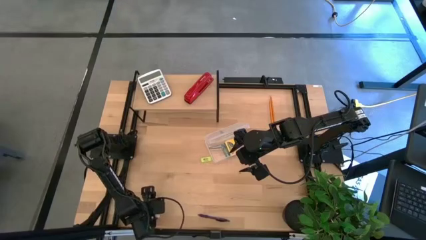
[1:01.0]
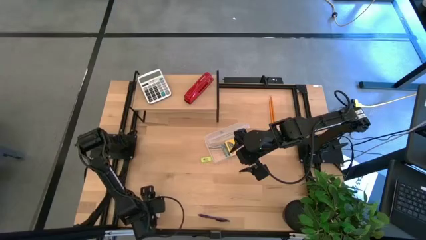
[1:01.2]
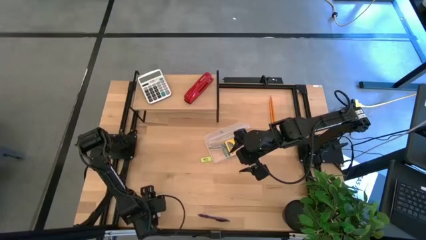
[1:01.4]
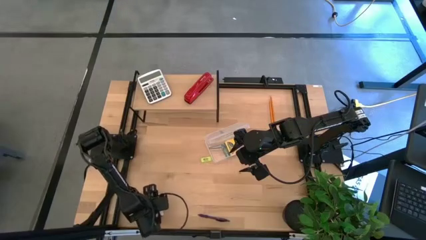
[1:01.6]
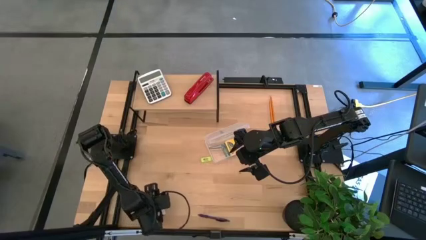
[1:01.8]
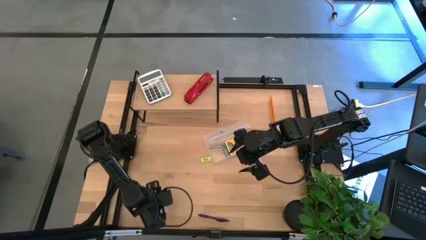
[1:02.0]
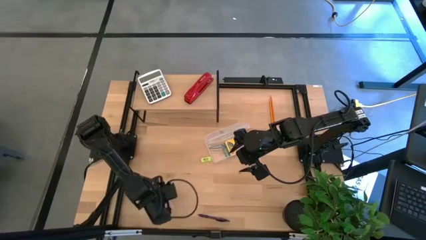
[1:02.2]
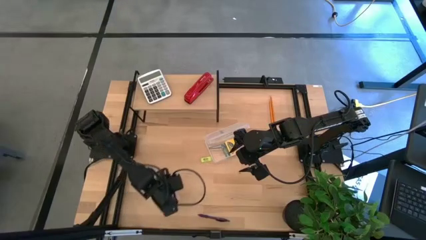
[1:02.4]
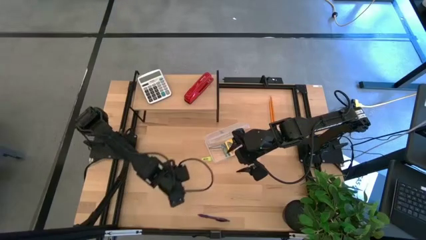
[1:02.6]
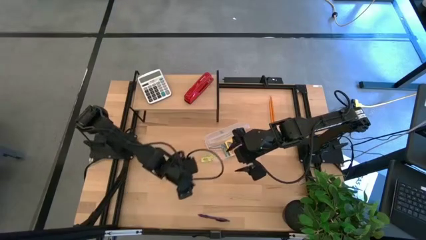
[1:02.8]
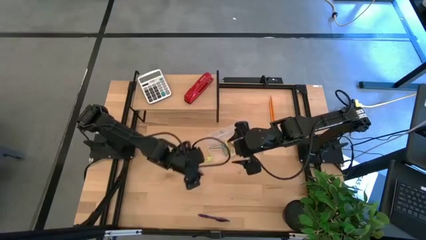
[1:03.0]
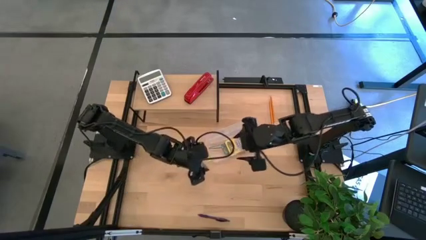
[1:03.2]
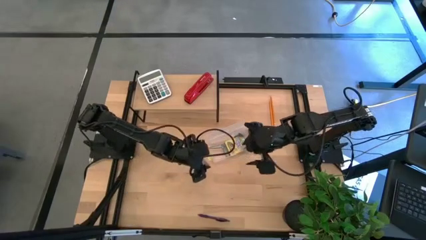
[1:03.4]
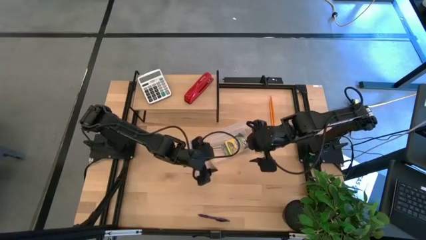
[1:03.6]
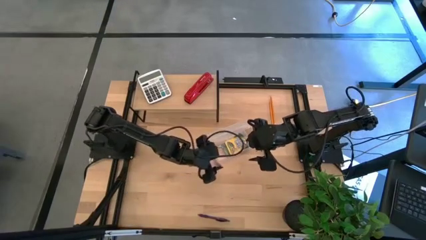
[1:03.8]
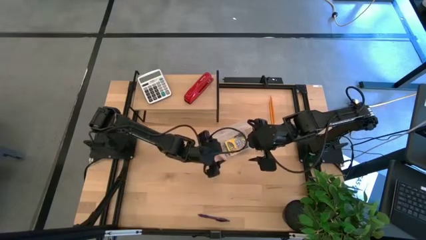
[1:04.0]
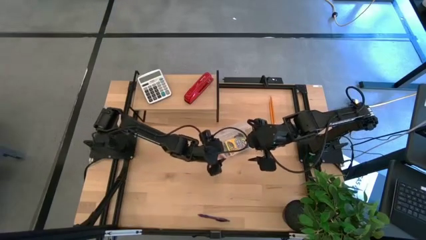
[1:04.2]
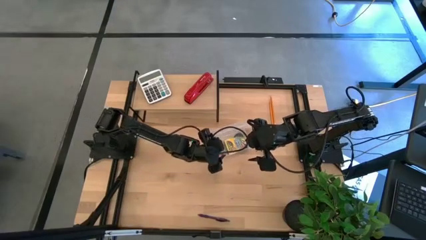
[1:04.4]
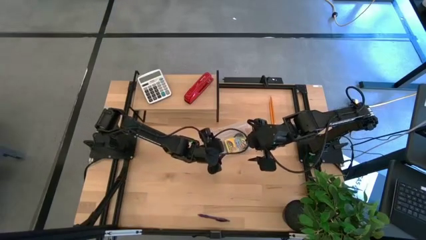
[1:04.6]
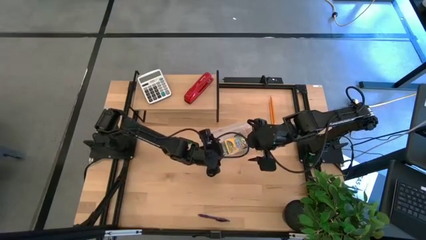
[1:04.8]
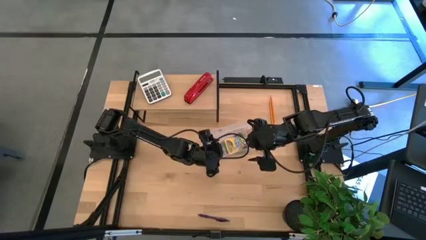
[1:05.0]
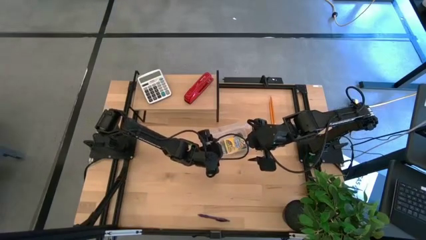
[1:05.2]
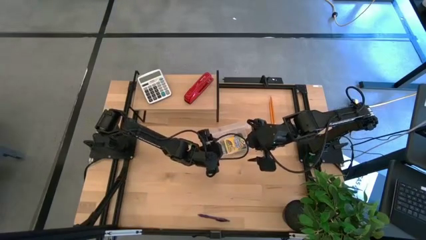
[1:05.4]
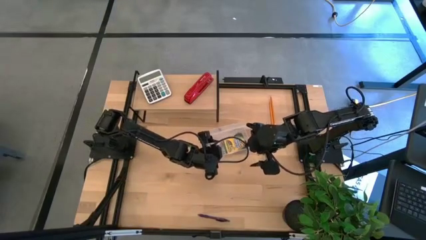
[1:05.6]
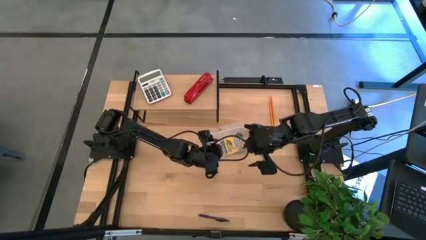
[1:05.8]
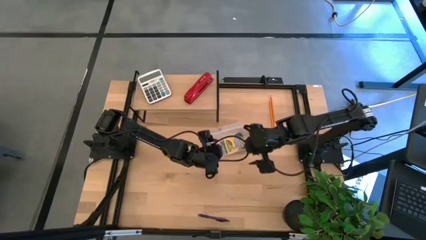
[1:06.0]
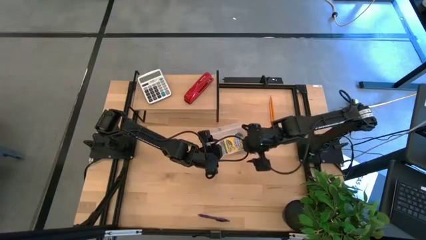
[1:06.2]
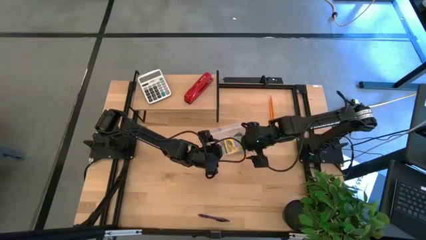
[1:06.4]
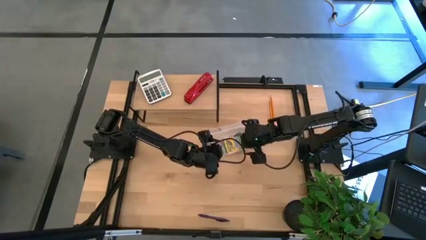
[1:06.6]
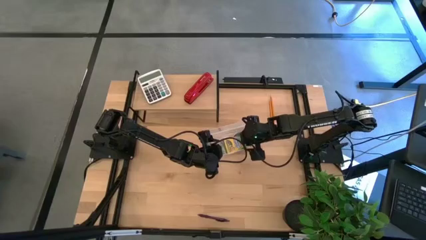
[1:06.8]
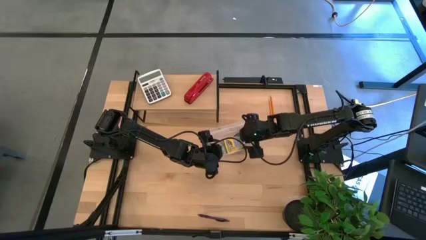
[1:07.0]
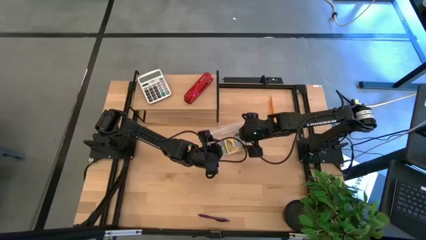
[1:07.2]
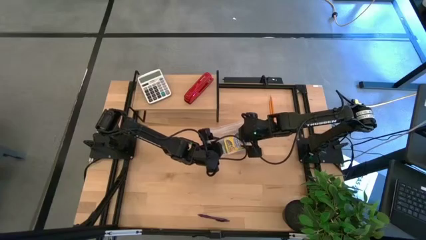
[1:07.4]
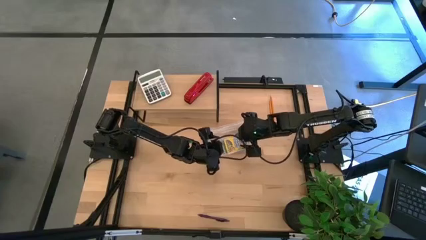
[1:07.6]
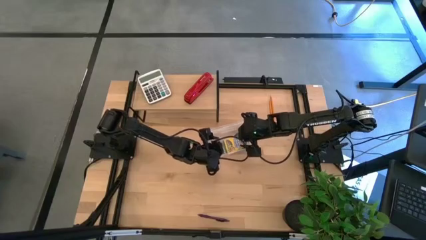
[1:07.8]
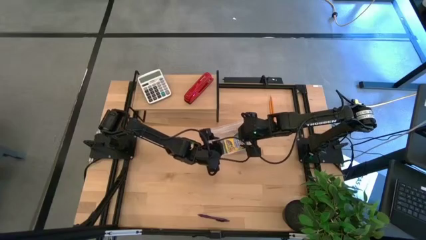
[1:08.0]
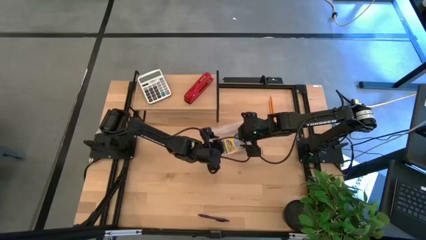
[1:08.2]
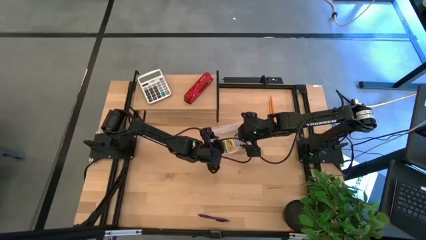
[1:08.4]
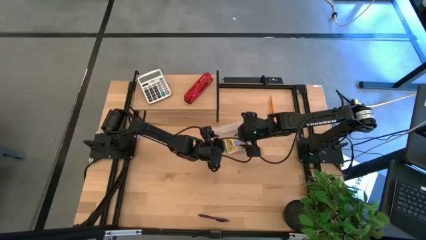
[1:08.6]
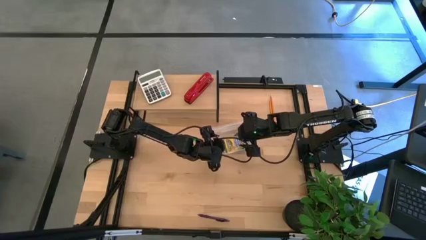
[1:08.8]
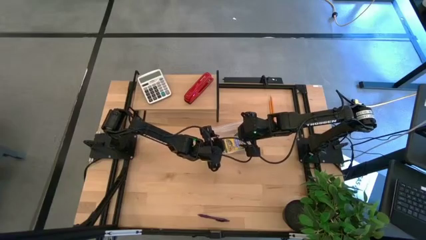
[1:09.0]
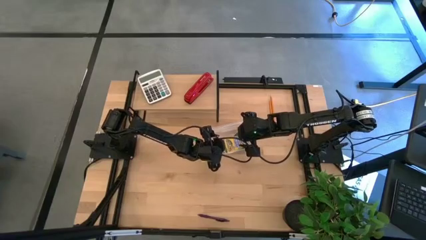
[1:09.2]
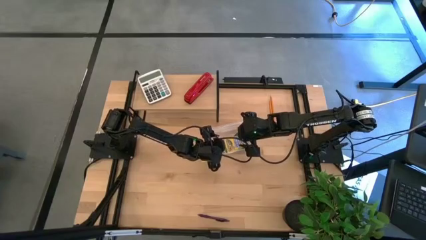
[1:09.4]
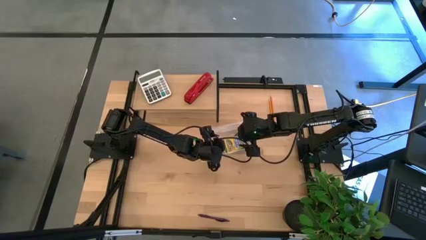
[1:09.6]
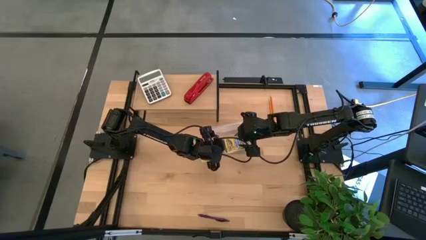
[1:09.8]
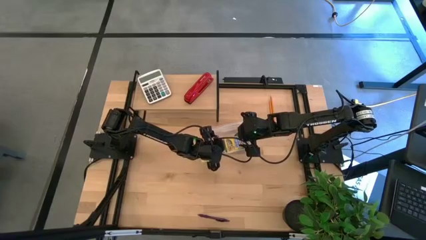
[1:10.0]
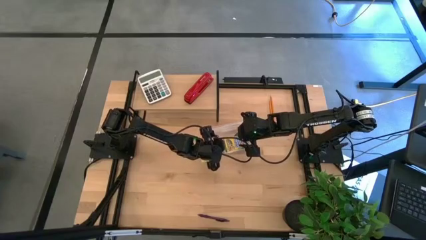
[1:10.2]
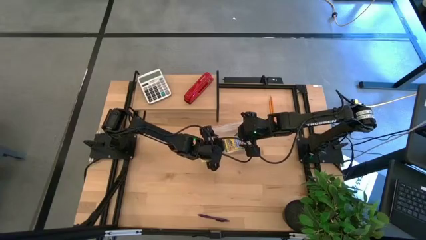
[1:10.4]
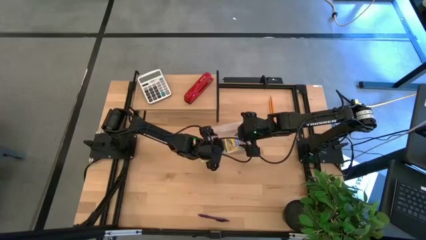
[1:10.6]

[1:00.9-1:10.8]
Task: Pack school essentials
Put the pink sticky note into the supply box

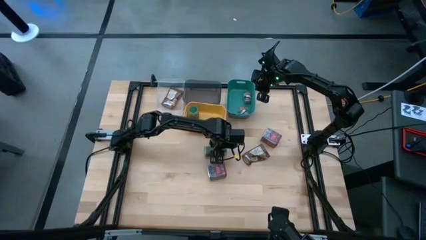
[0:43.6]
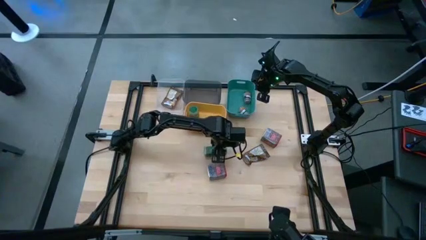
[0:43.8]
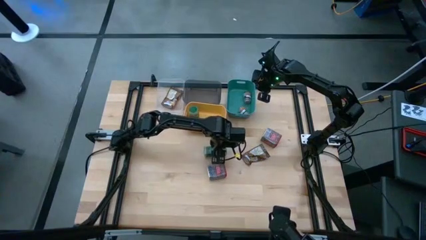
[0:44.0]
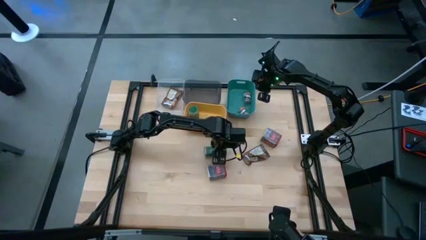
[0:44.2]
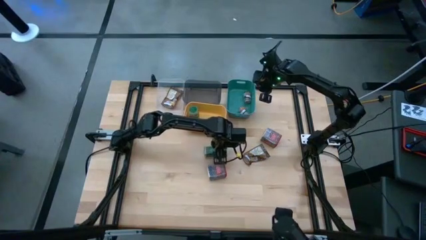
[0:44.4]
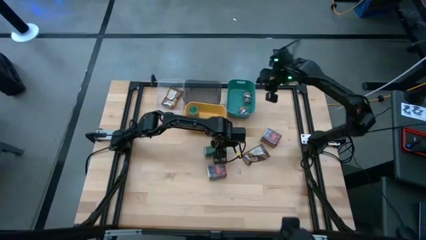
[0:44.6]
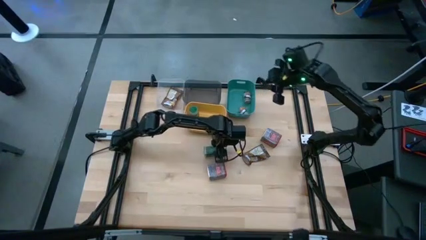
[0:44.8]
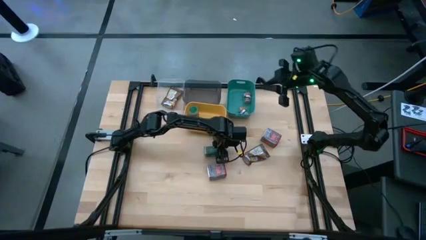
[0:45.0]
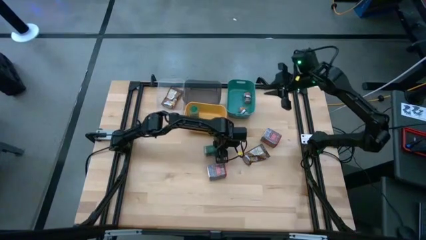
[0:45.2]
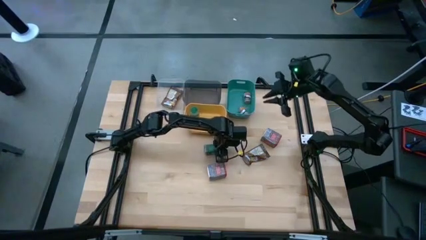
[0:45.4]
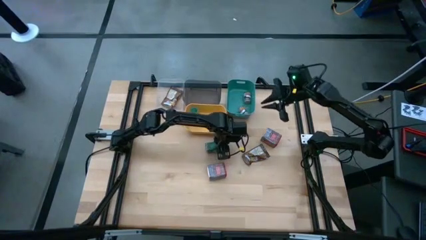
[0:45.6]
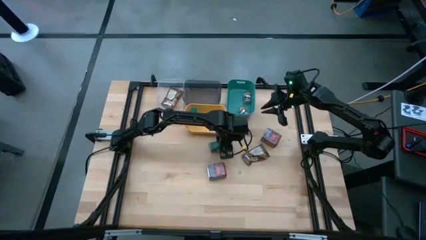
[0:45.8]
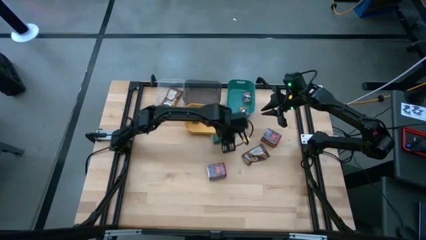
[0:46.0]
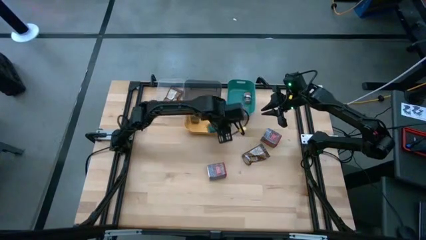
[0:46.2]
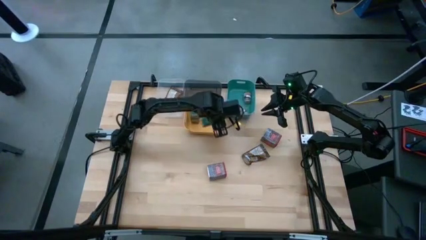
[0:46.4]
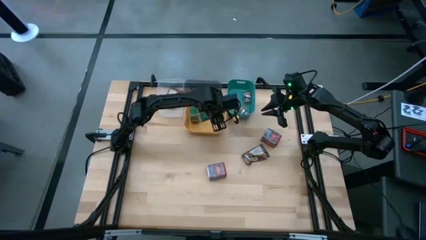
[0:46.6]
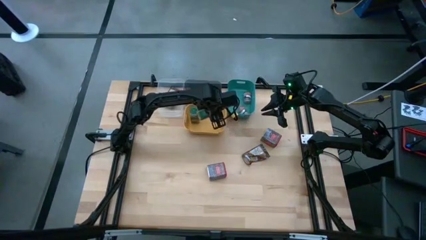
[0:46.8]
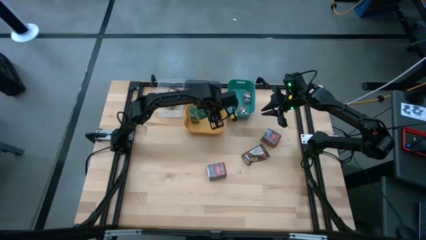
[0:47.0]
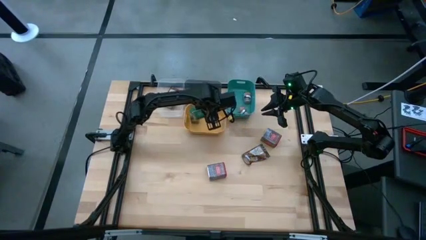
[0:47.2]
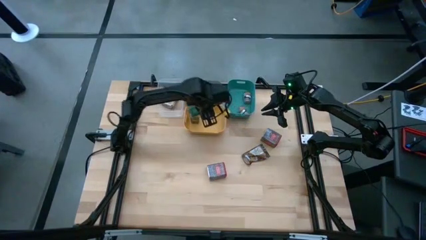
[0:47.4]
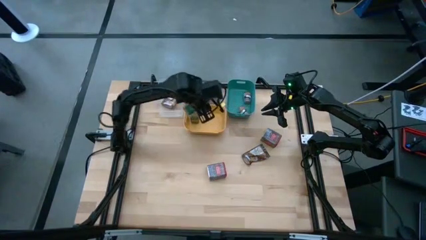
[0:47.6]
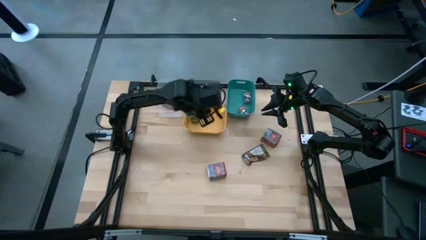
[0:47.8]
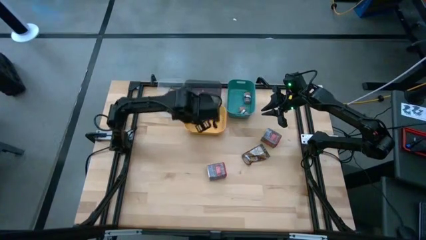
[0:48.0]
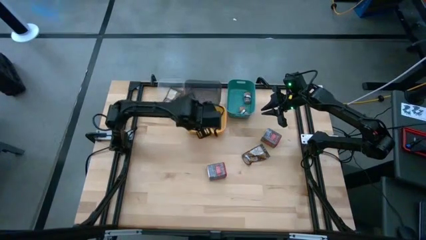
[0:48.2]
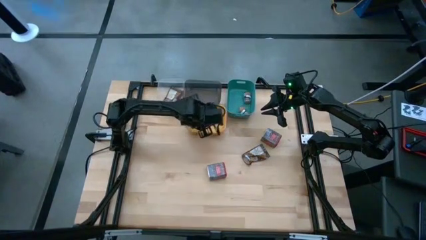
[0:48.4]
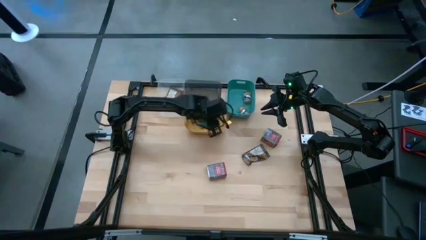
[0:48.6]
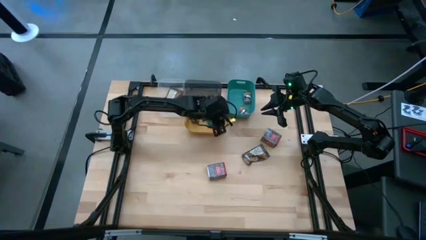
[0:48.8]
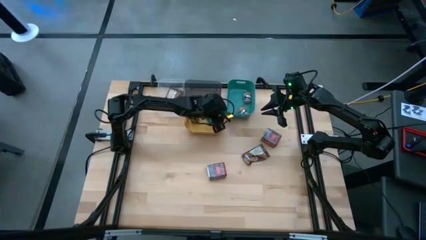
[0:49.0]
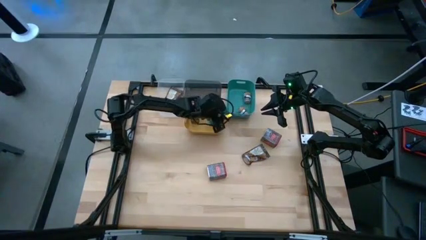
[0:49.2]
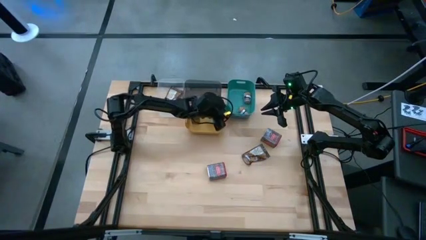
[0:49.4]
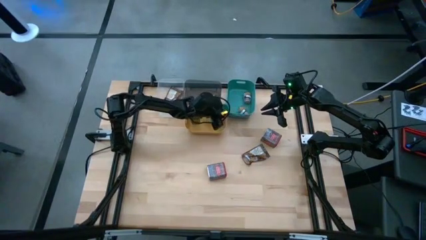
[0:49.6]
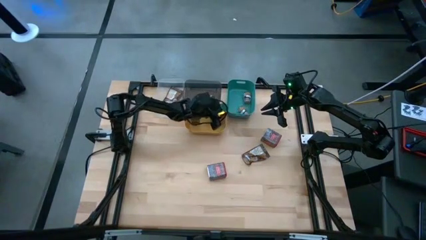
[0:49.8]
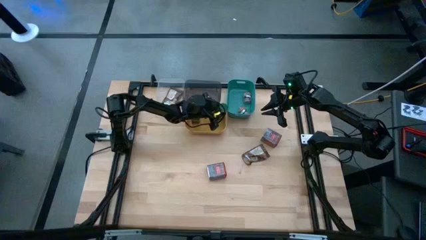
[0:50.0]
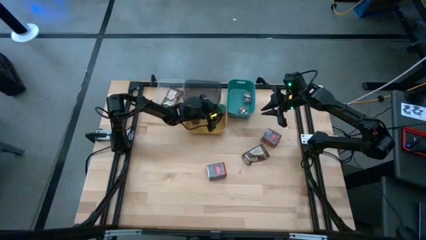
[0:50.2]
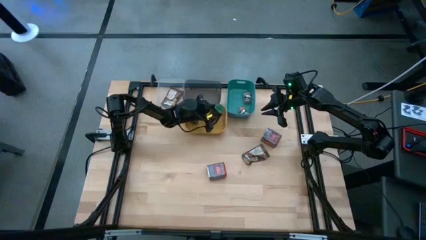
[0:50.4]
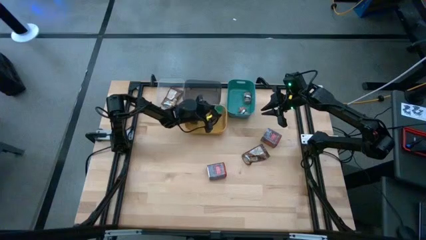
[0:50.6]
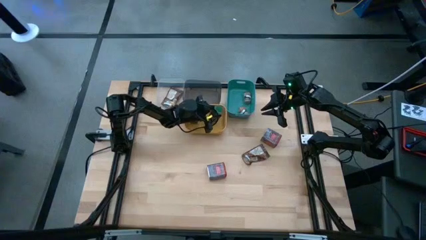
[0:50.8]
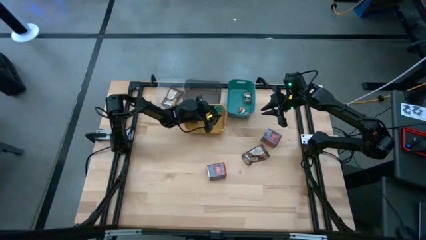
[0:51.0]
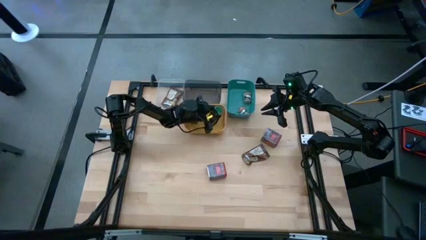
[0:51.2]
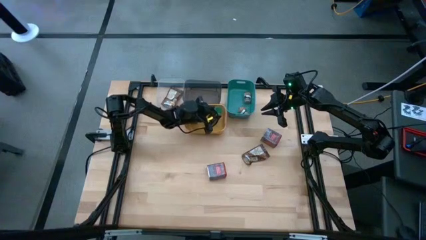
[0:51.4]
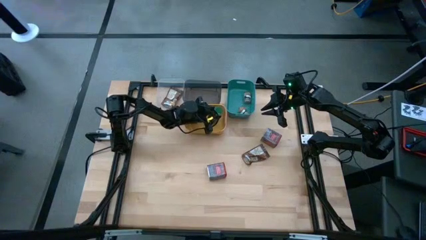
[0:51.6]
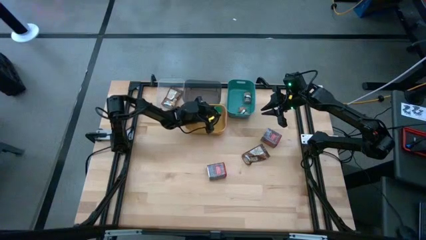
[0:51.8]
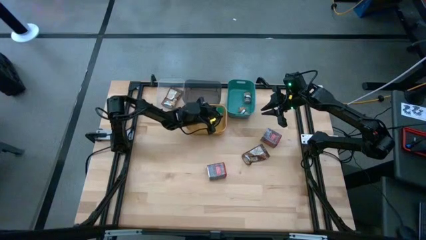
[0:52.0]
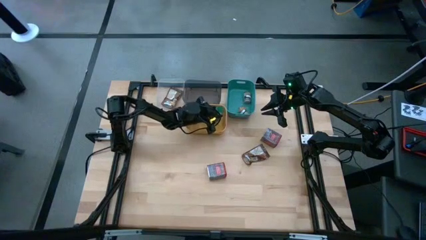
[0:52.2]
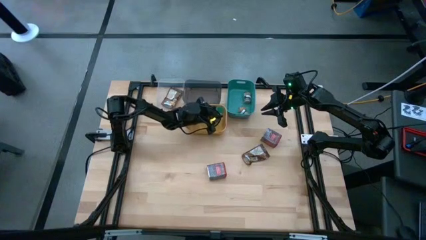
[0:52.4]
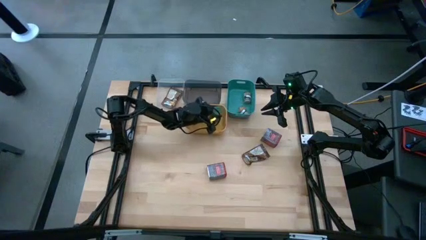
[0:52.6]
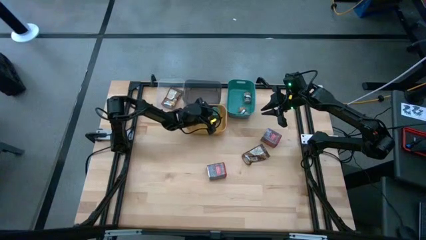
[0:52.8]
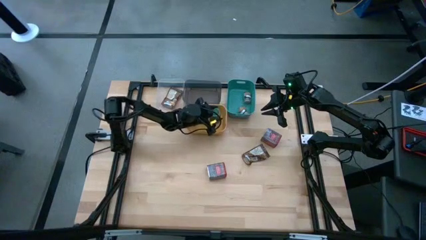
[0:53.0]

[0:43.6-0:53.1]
Task: Sort spices by type
Put the green seasoning bottle into the yellow bin
